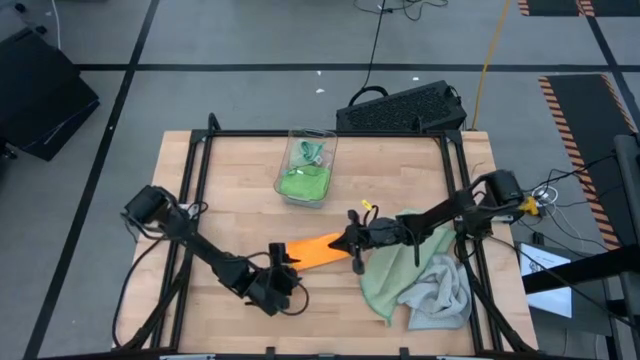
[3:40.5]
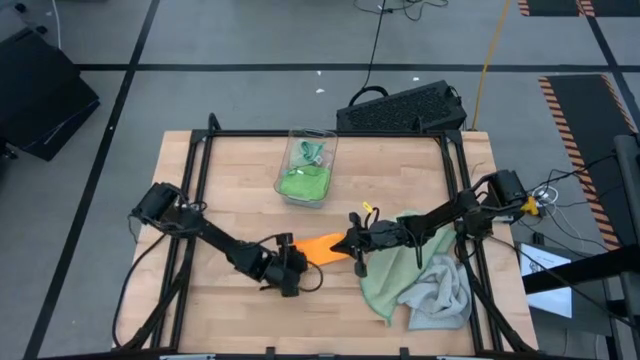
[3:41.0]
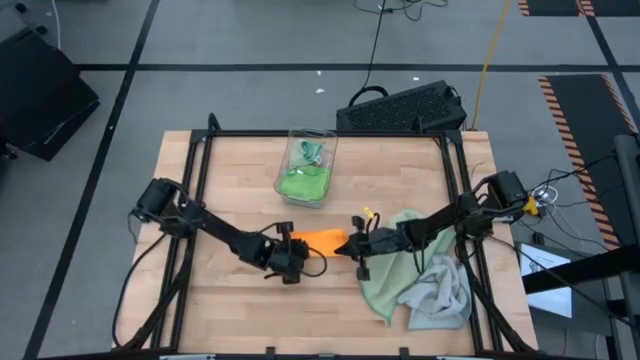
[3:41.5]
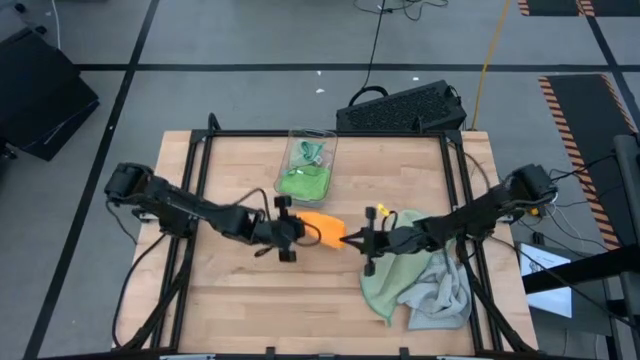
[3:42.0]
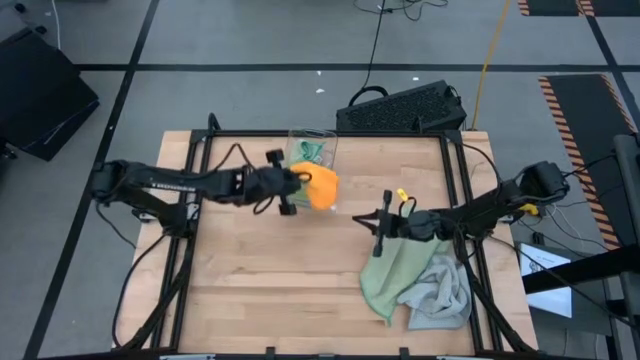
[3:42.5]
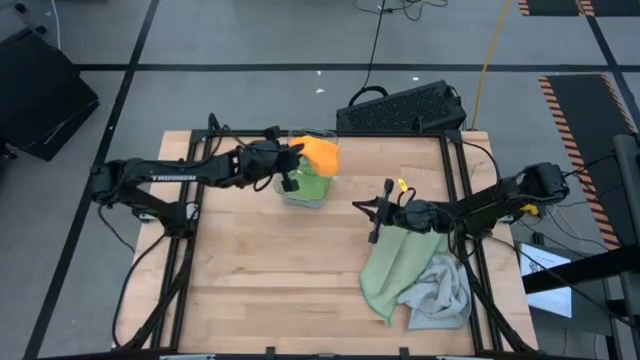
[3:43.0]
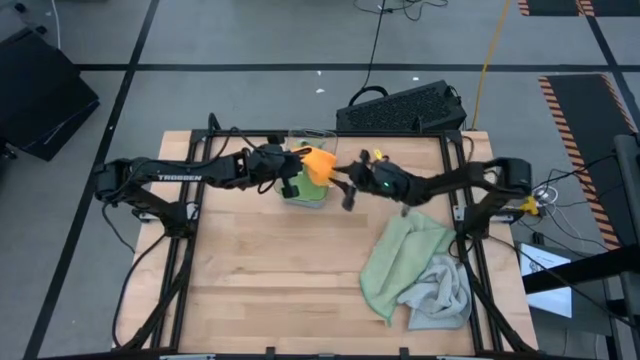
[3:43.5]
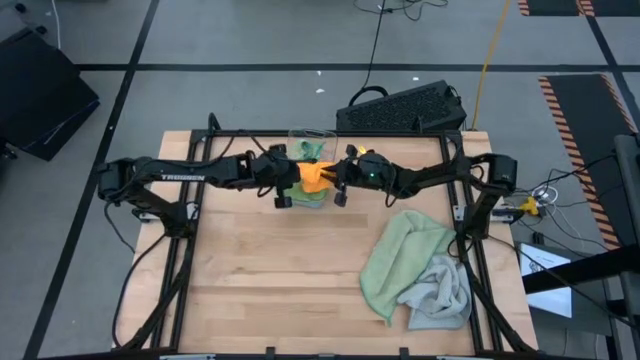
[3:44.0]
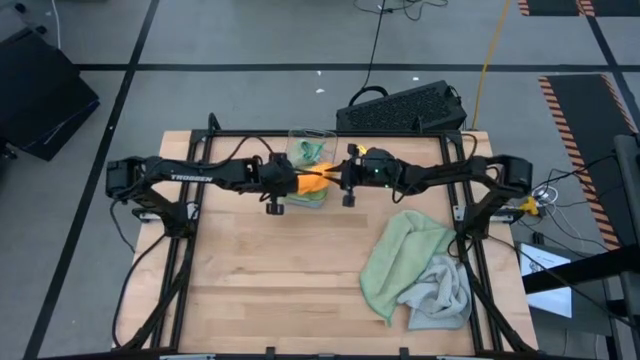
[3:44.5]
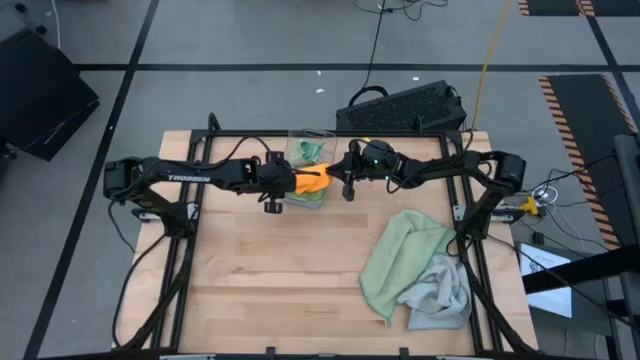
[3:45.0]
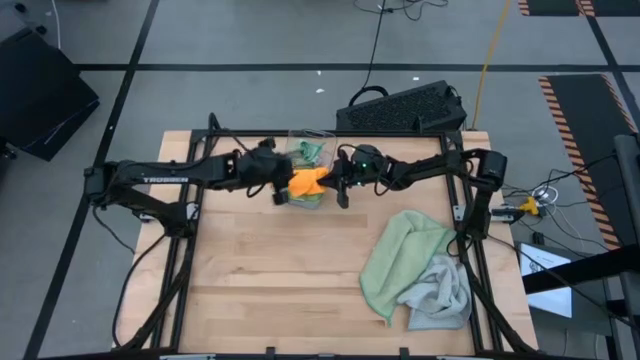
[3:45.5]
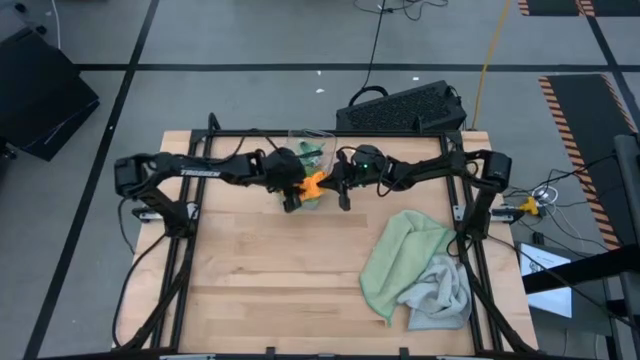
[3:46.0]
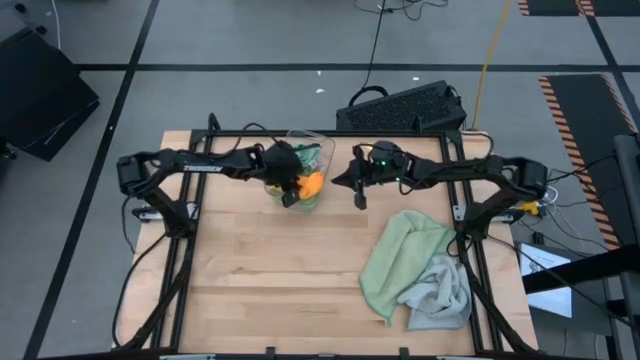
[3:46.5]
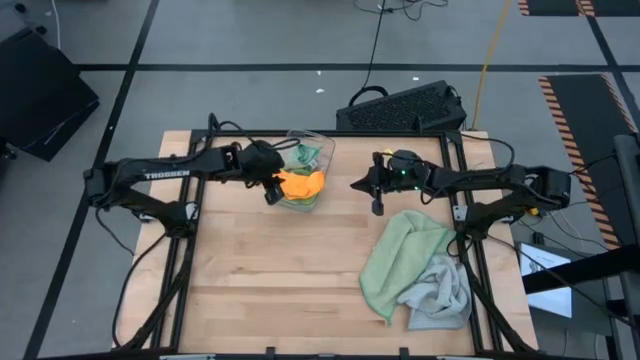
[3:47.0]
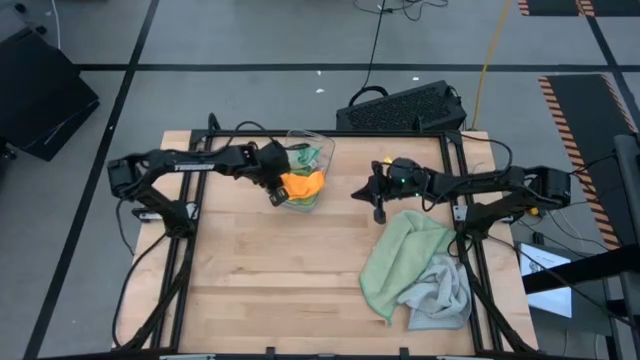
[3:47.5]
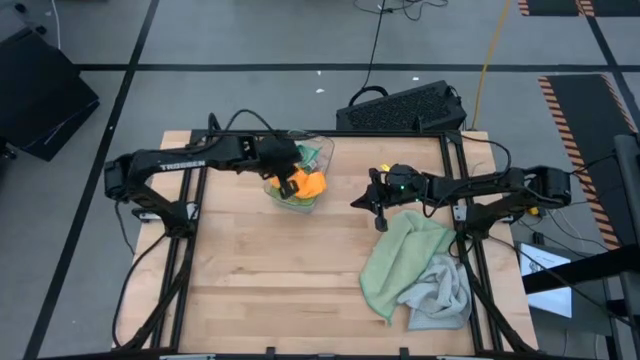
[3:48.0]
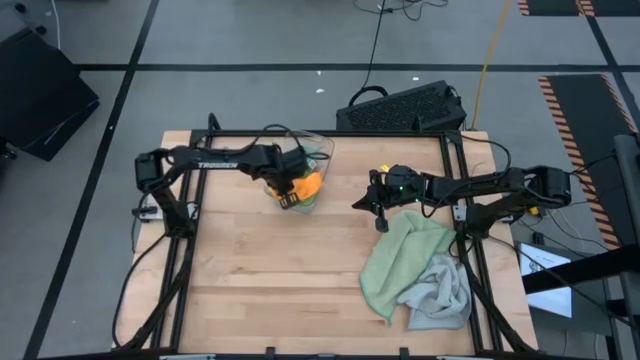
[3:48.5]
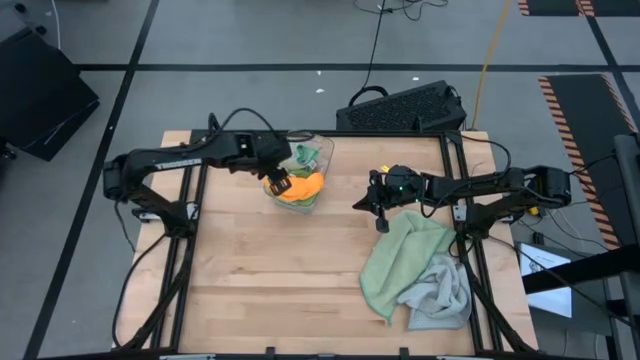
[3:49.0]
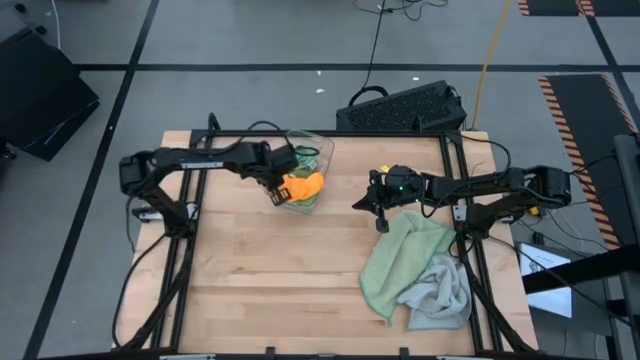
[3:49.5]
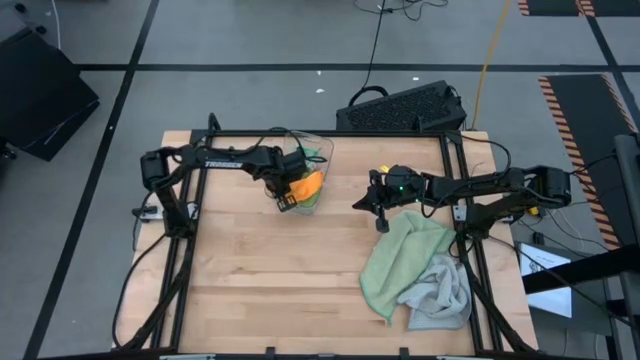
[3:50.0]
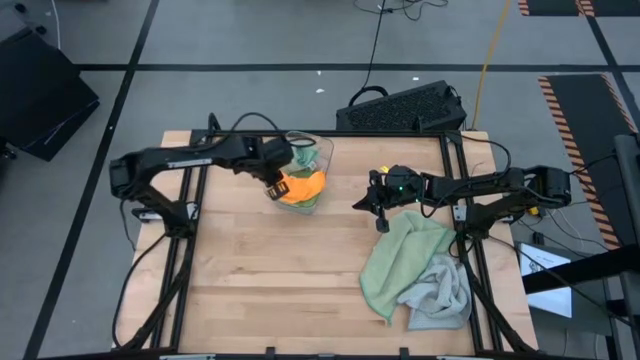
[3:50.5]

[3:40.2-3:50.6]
Task: Fold microfiber towels
Put the folded yellow towel into the transparent bin

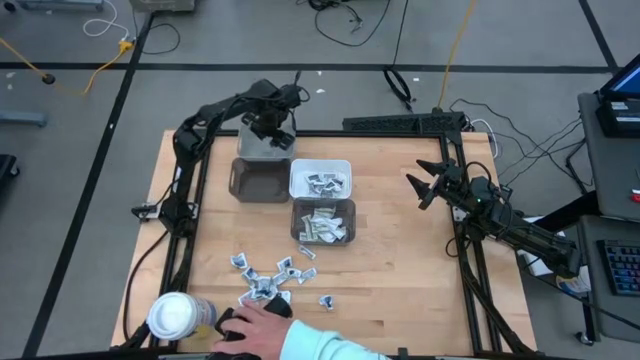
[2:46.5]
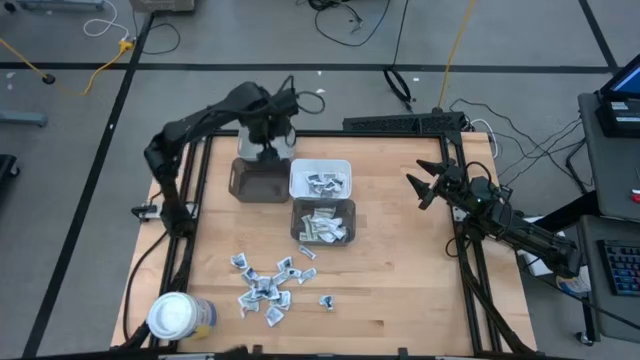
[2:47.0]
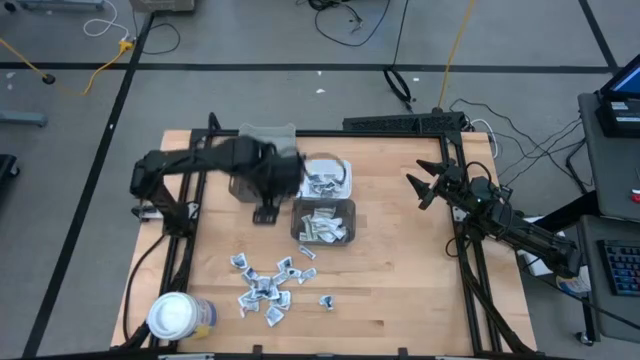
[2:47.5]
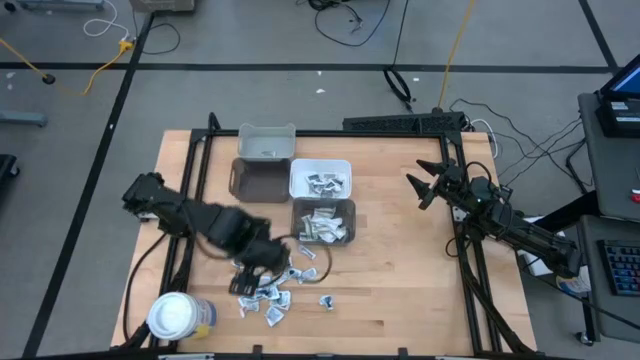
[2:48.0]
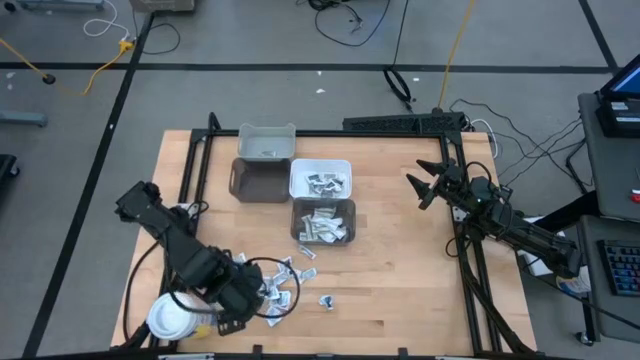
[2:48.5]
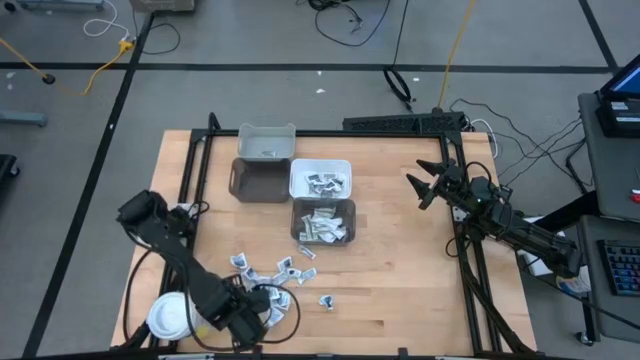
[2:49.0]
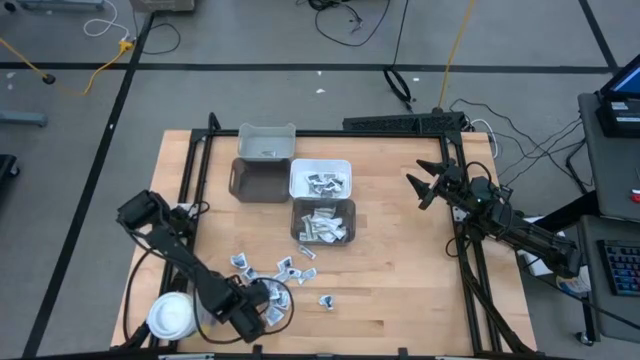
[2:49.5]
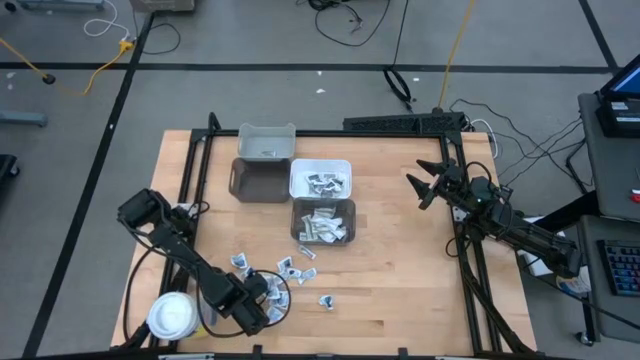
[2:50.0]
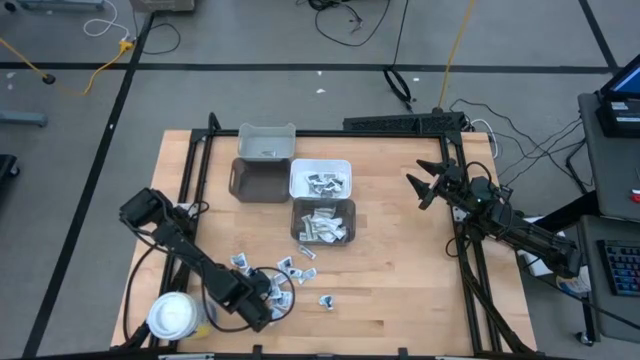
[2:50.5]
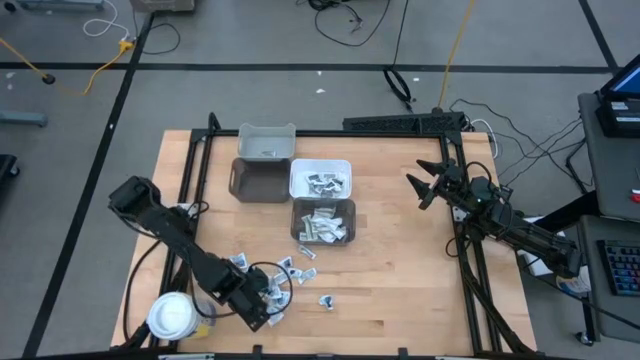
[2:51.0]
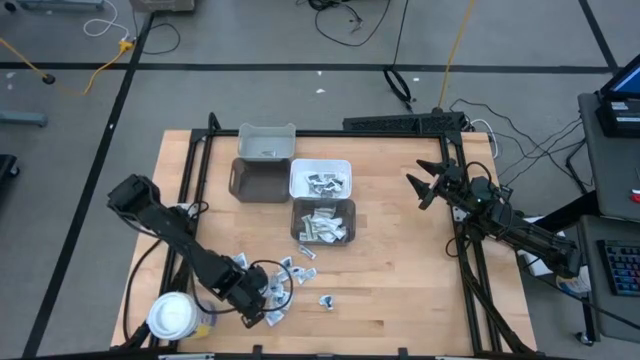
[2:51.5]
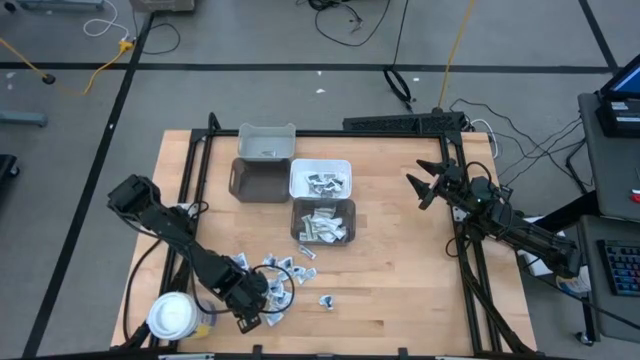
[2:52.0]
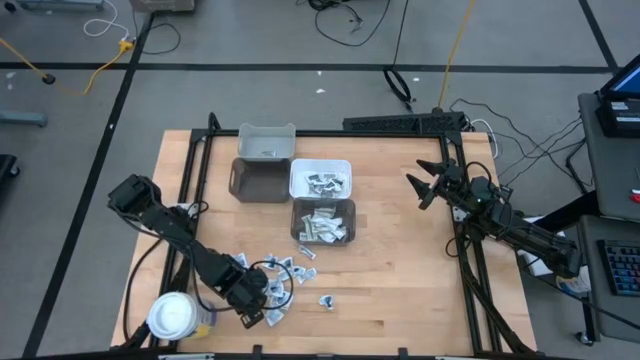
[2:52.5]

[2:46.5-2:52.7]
Task: Pick & Place First Aid Supplies
Put the orange ointment pack into the gray bin

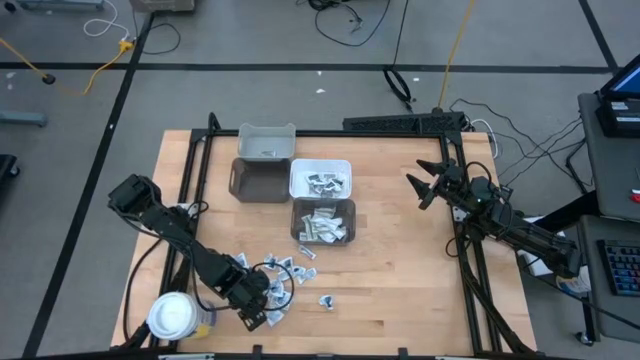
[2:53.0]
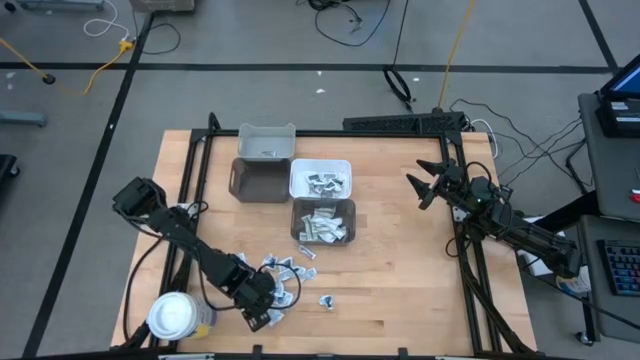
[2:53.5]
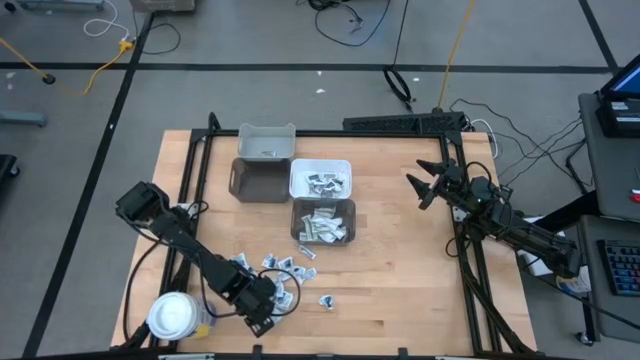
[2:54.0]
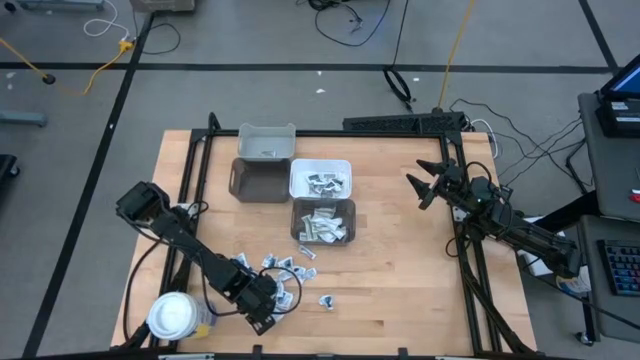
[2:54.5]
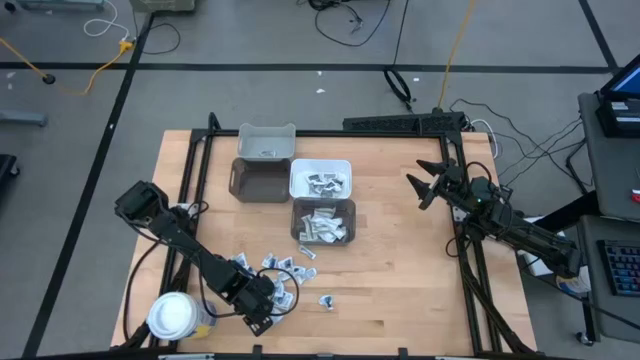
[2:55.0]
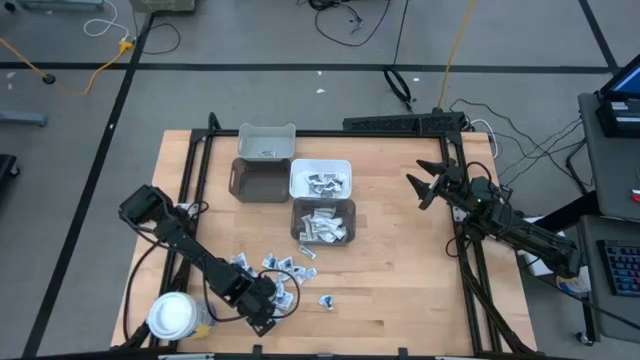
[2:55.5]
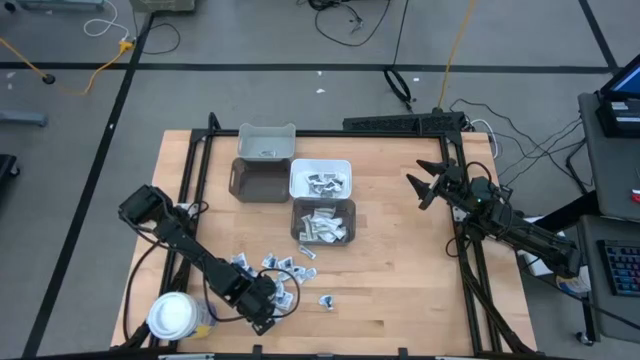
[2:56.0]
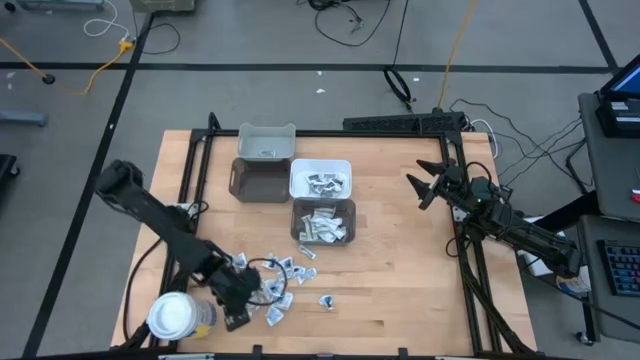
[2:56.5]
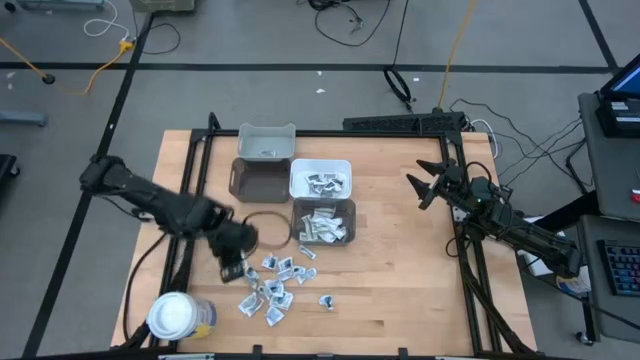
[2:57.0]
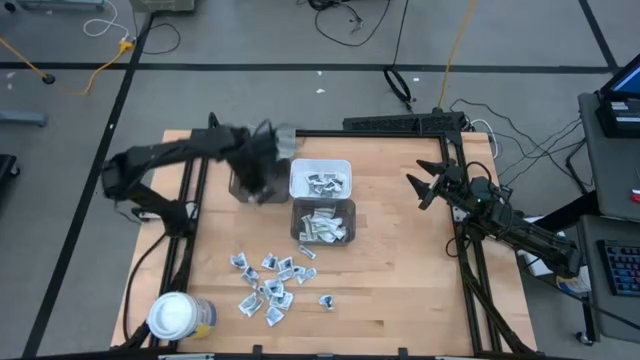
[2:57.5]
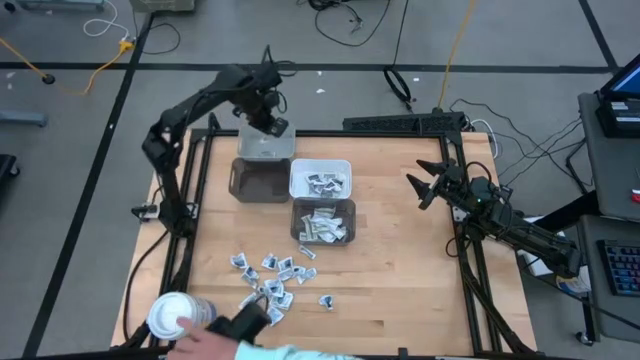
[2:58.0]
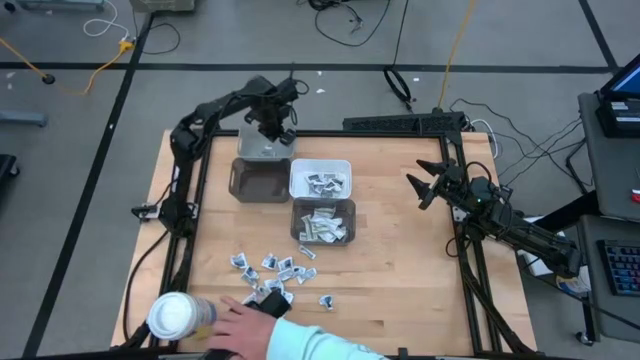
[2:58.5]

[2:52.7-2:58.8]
Put the orange ointment pack into the gray bin
